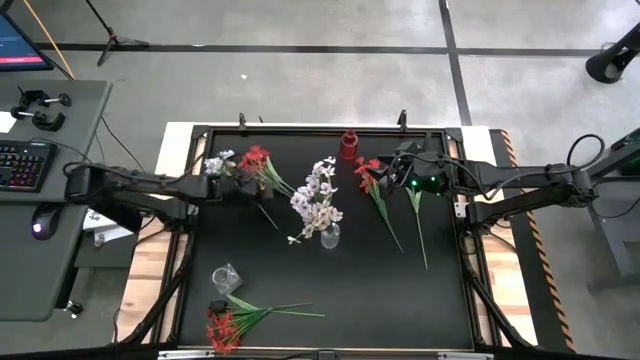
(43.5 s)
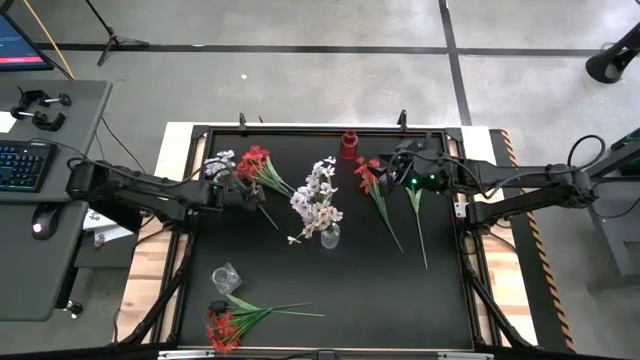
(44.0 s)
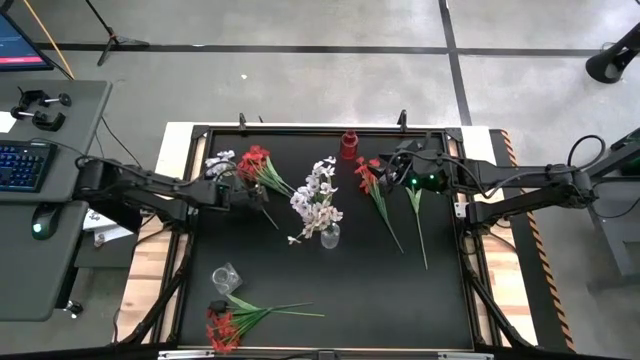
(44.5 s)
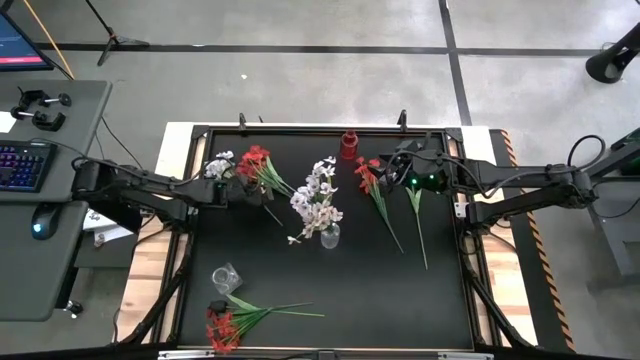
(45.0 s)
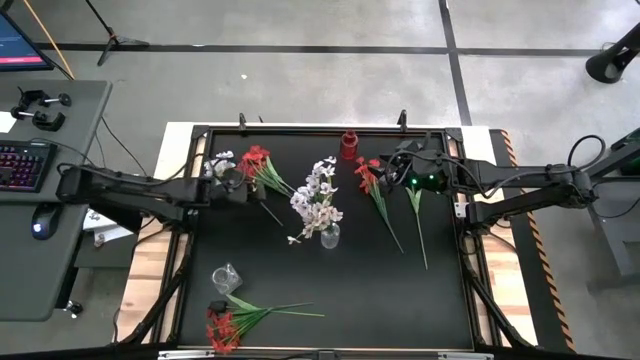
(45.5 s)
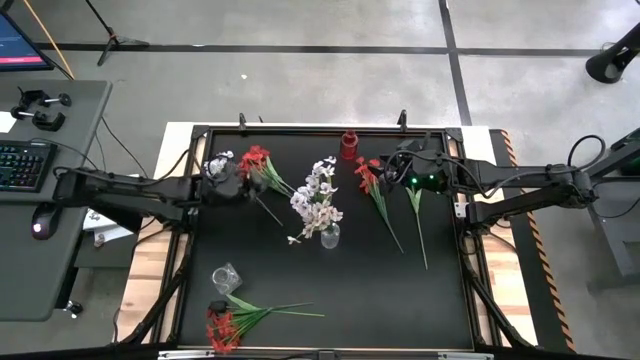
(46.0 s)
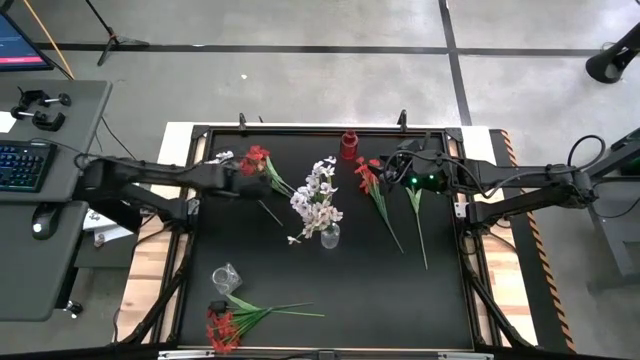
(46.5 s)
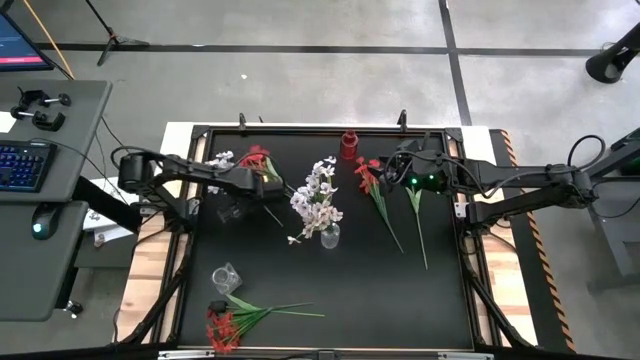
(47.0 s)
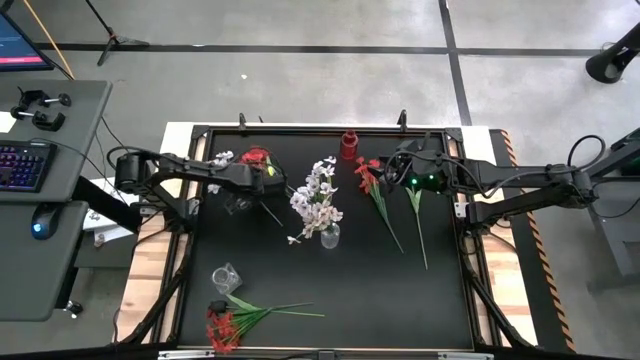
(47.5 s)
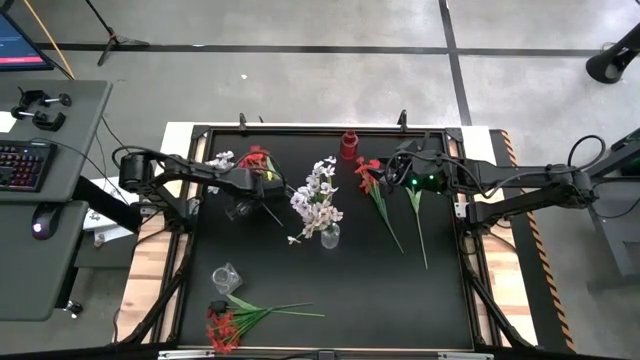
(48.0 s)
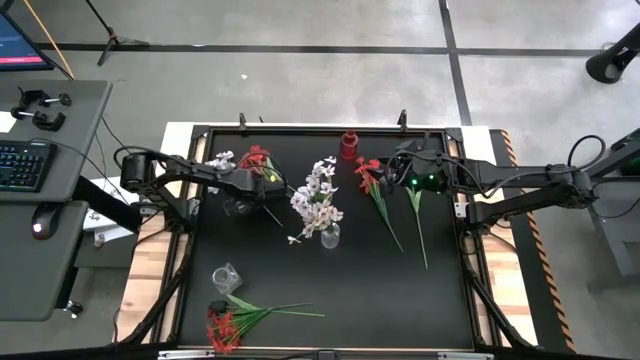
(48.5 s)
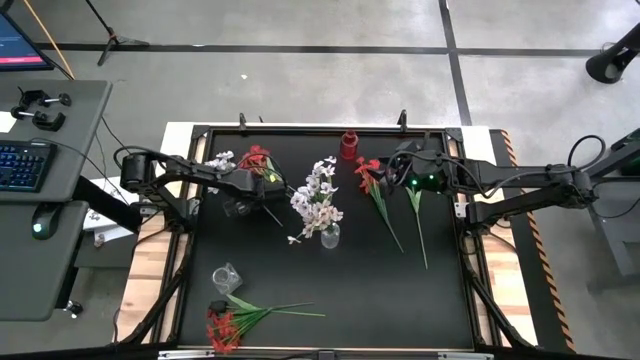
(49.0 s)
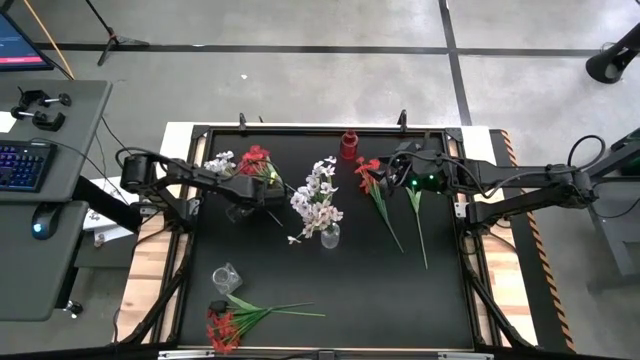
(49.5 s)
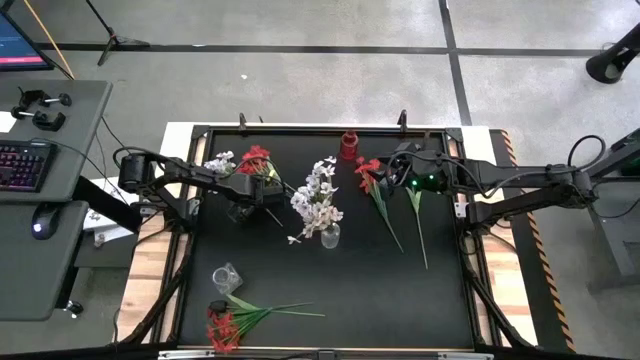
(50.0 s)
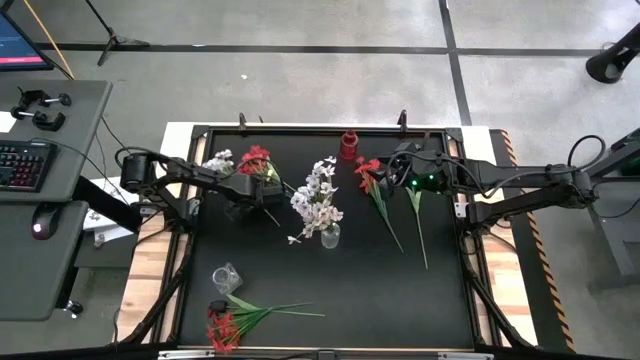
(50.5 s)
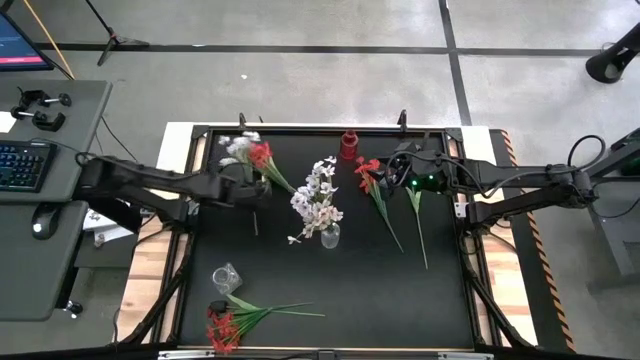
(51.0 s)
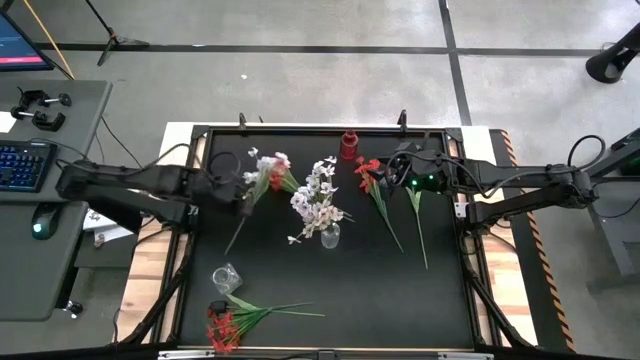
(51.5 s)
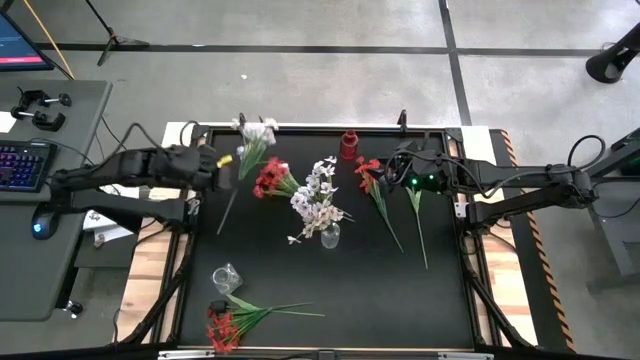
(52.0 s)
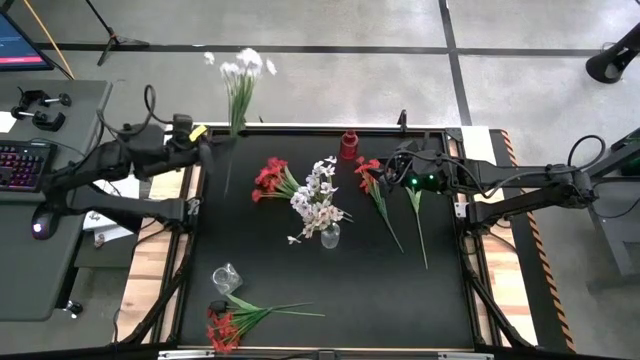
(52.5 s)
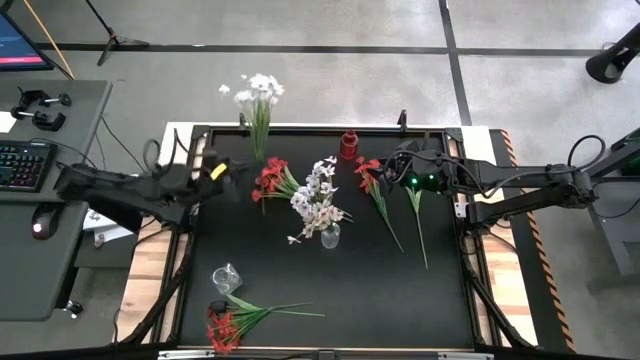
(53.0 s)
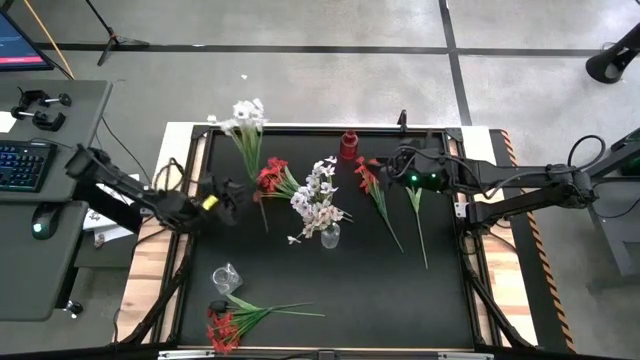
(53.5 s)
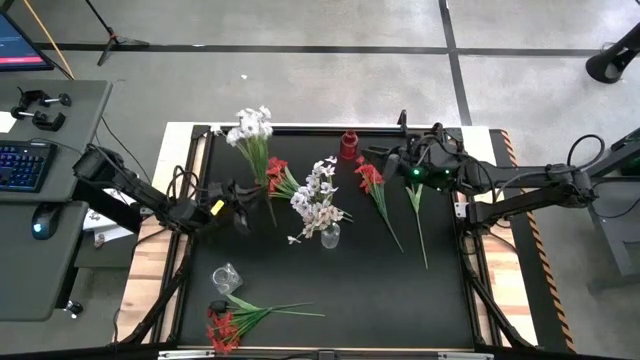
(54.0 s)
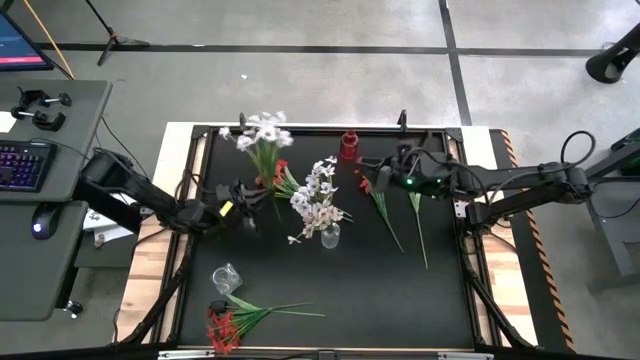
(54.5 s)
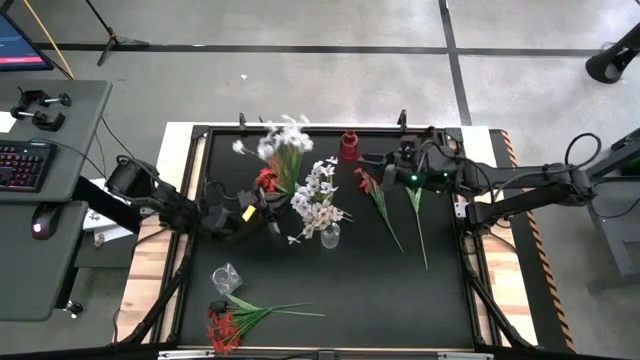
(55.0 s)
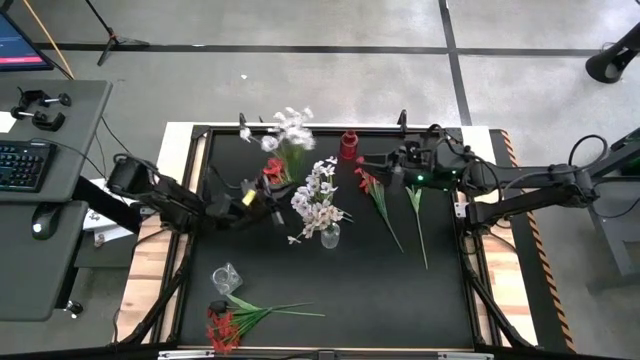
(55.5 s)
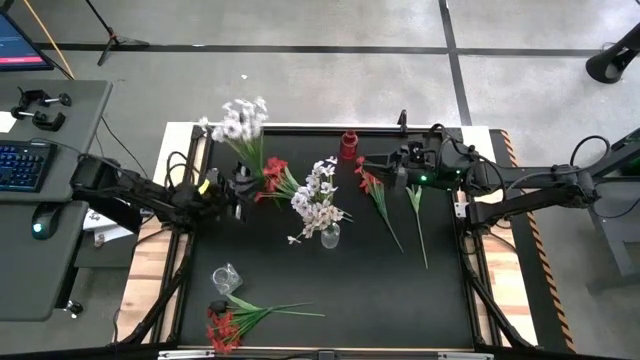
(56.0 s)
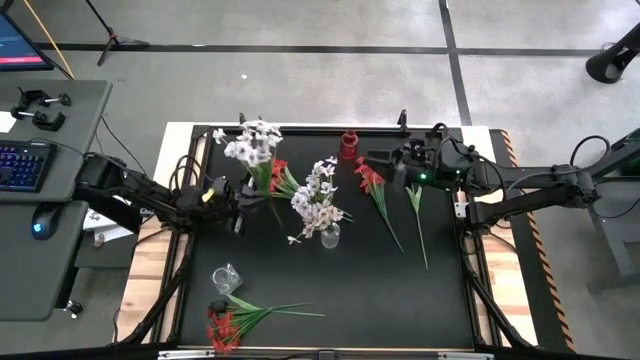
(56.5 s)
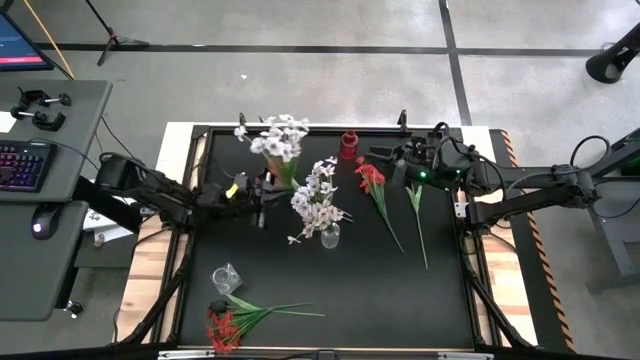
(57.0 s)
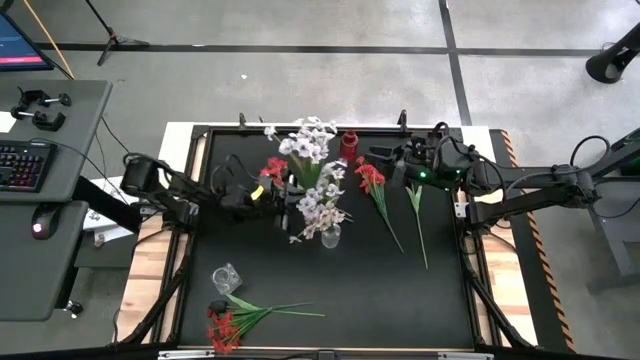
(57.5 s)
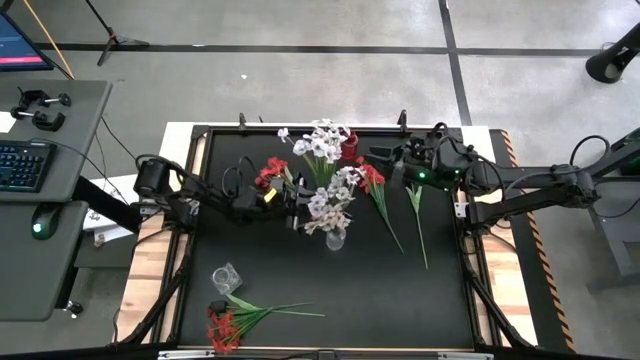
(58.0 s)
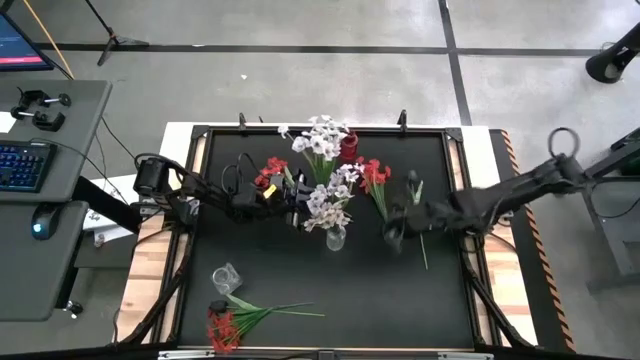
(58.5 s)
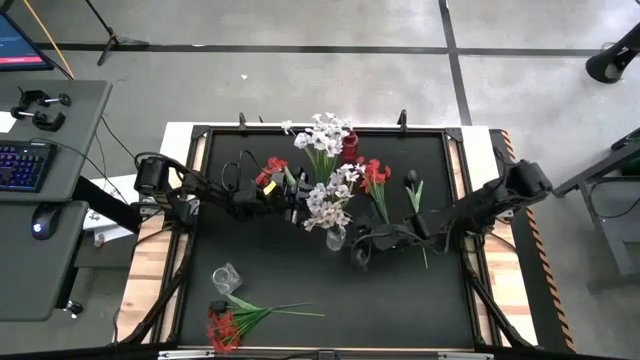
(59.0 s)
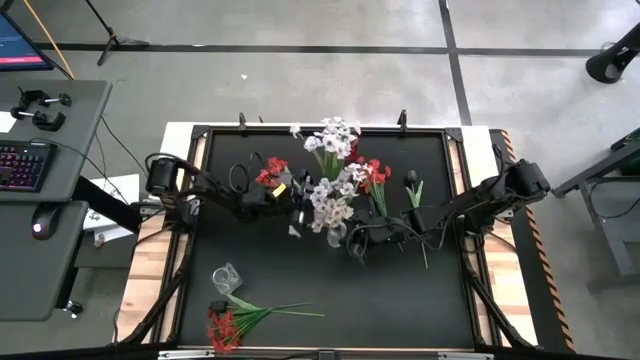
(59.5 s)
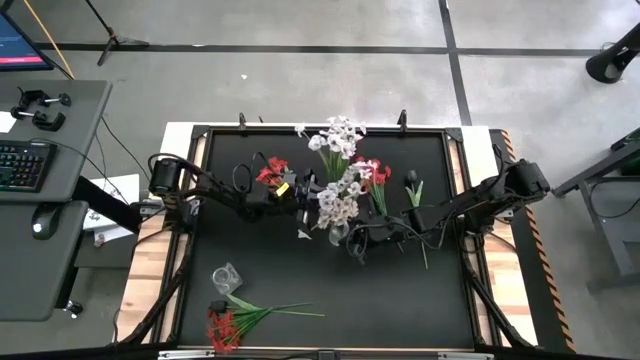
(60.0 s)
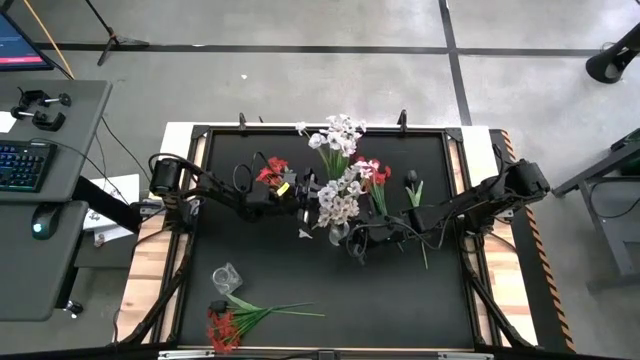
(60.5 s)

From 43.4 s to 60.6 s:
Task: Sort flowers into vase by color
Put the white flowers into the right transparent vase

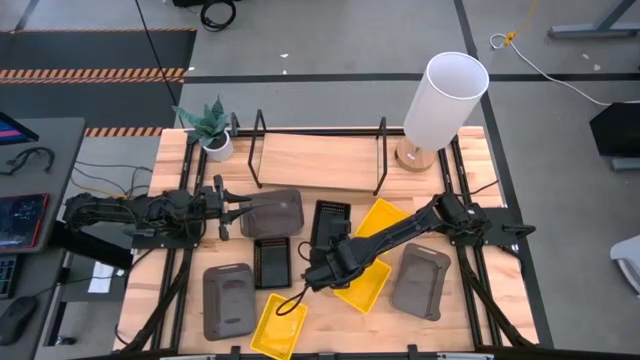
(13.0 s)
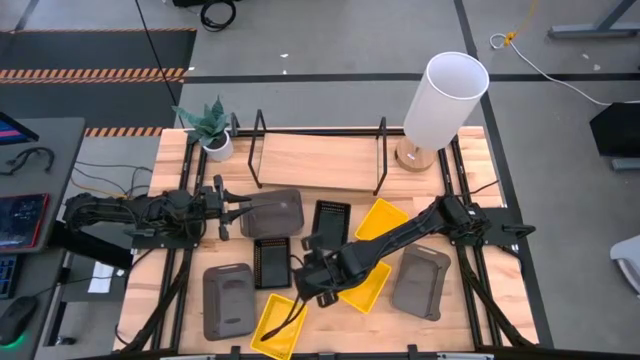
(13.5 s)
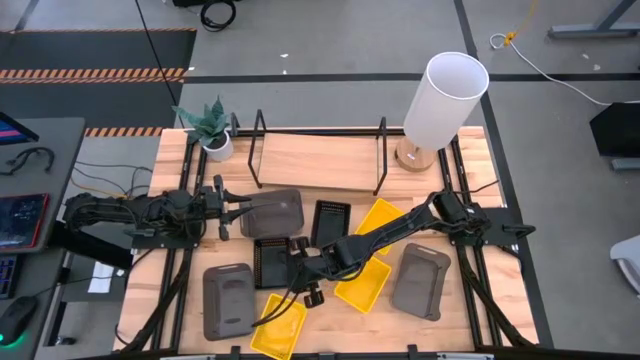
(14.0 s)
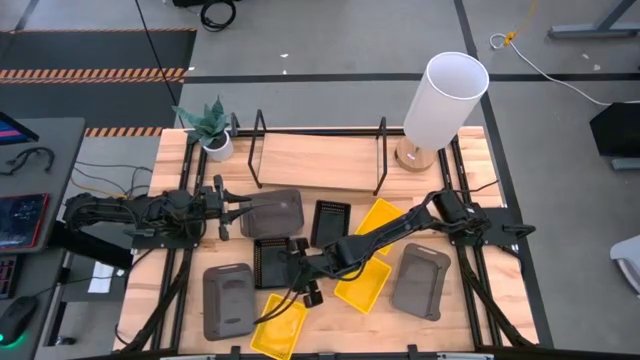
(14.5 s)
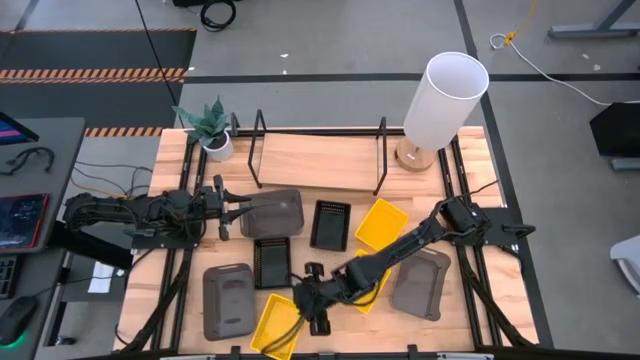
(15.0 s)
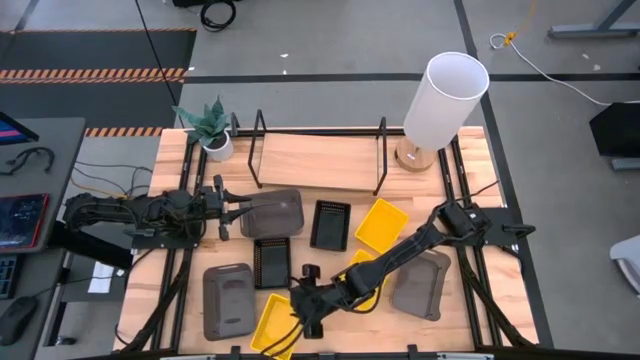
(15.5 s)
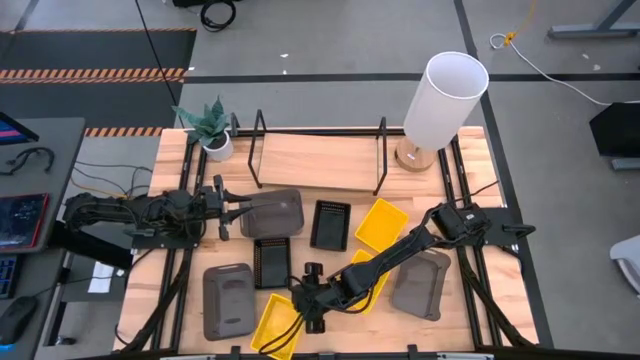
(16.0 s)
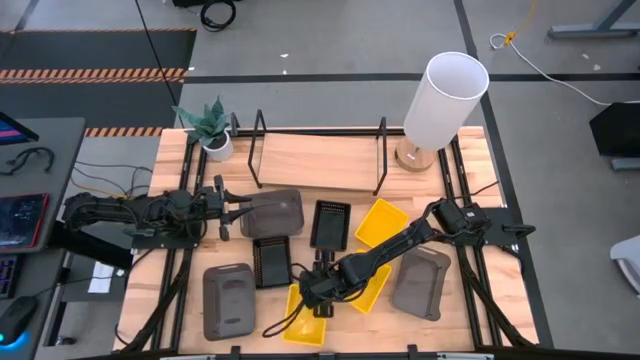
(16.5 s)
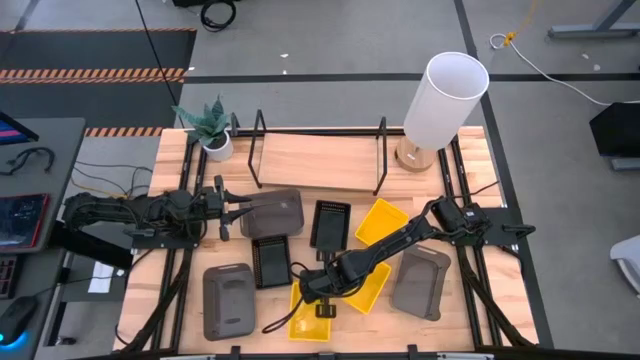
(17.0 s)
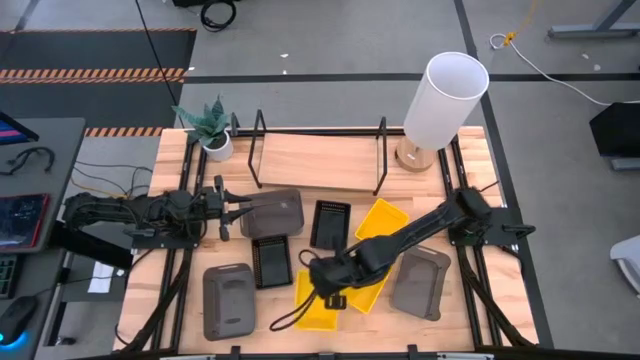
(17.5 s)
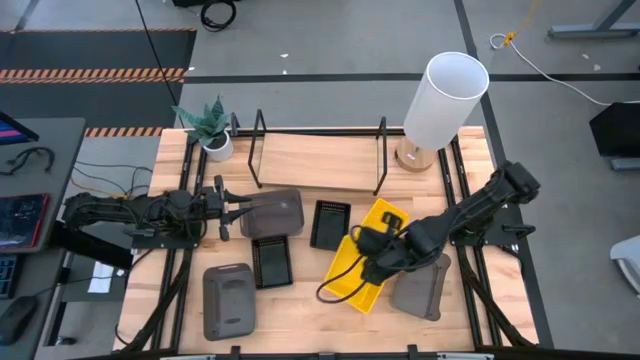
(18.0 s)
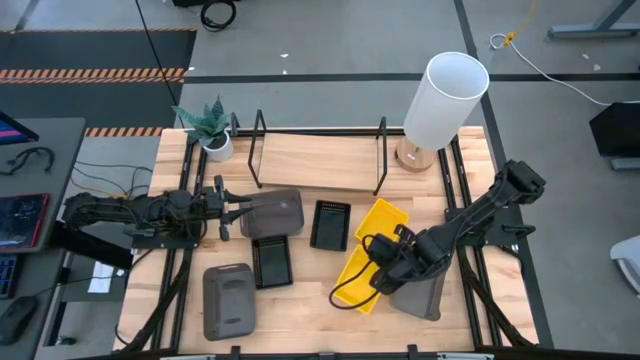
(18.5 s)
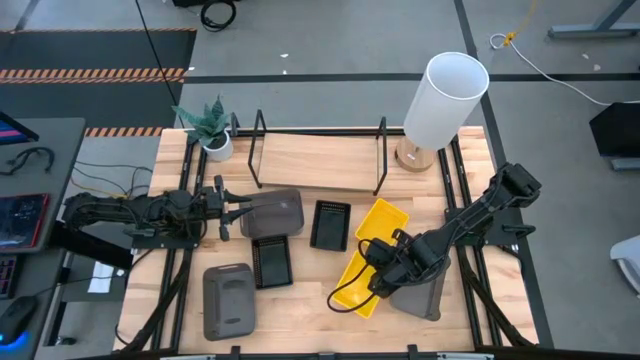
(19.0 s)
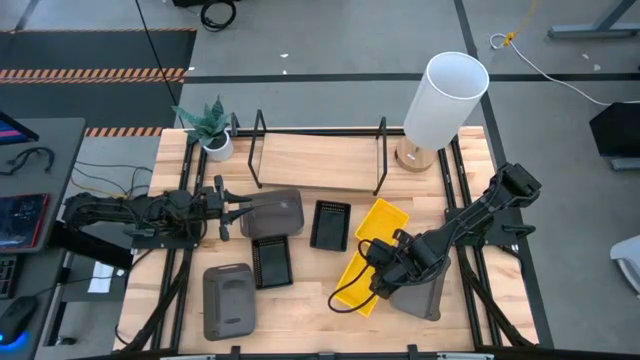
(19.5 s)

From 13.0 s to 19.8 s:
Task: Stack baskets on shelf by color
Stack the bottom yellow bin on top of the middle yellow bin
